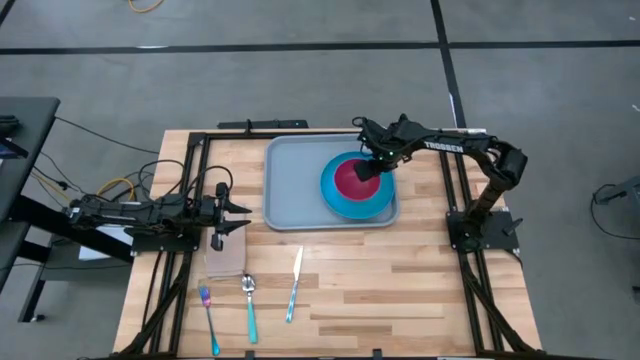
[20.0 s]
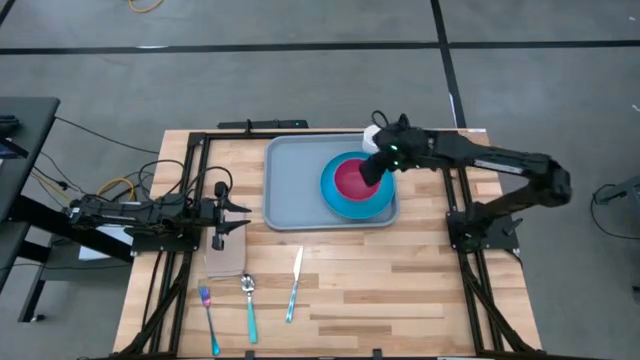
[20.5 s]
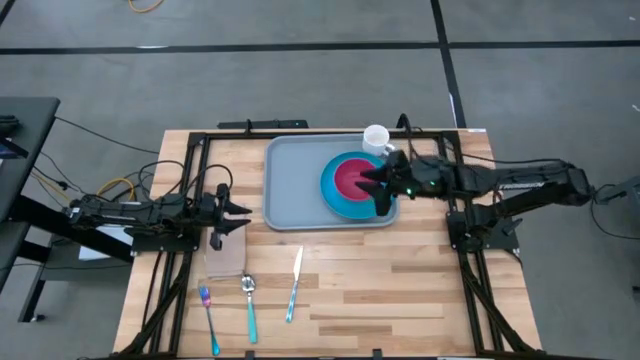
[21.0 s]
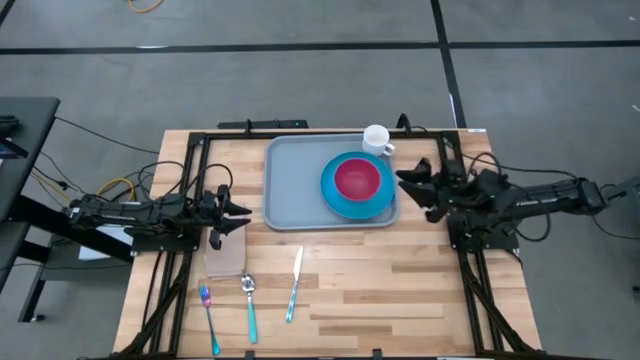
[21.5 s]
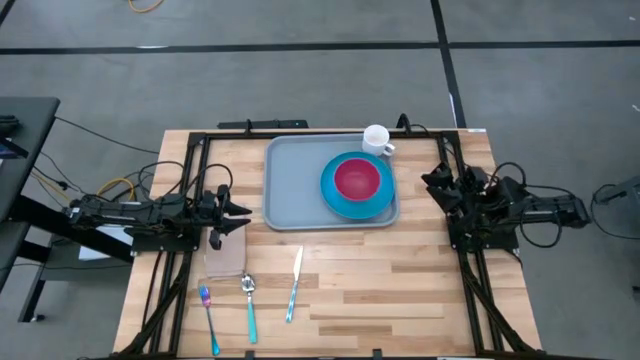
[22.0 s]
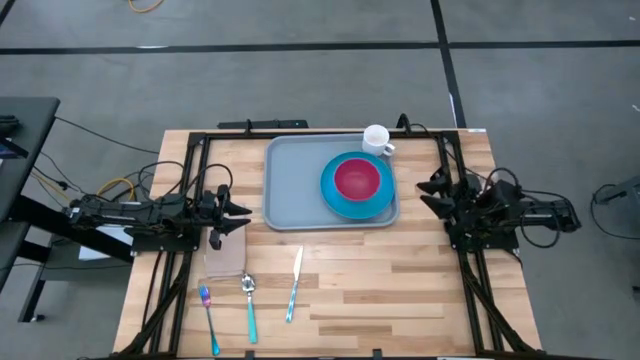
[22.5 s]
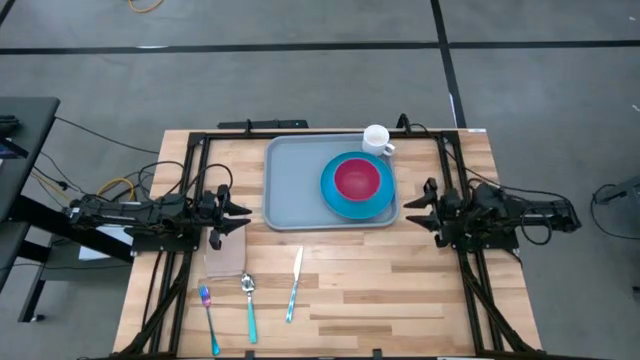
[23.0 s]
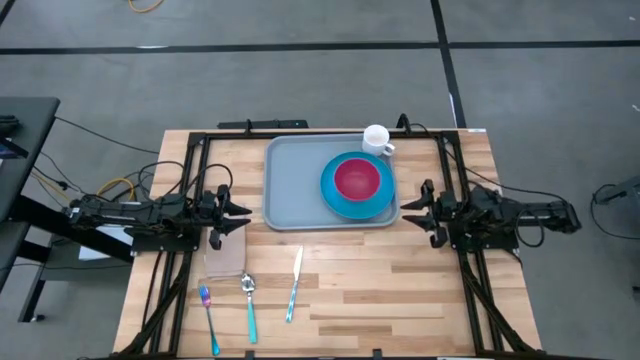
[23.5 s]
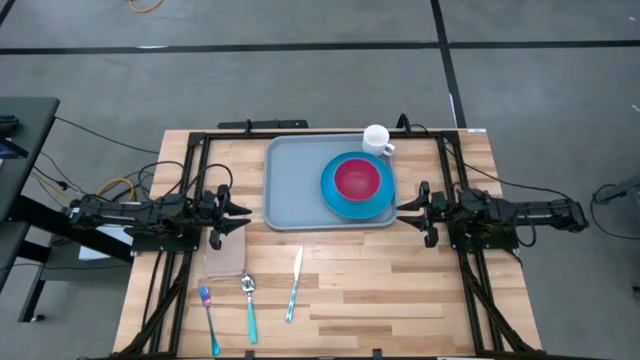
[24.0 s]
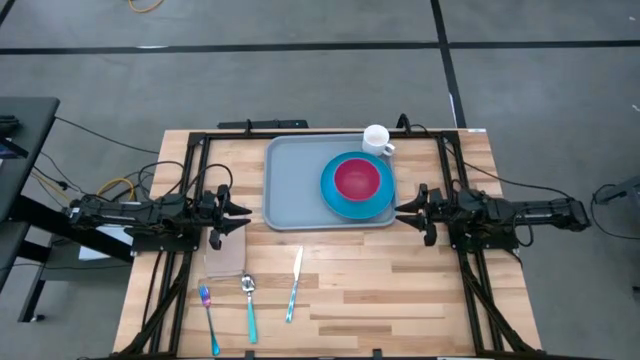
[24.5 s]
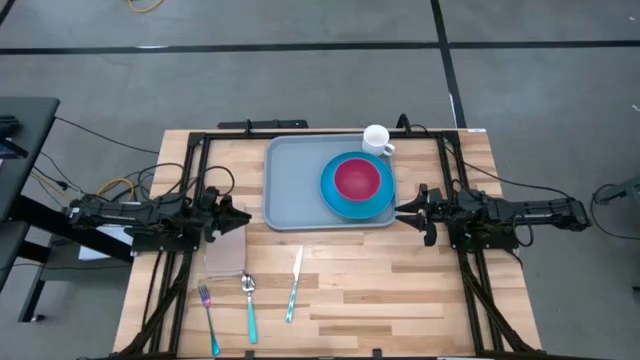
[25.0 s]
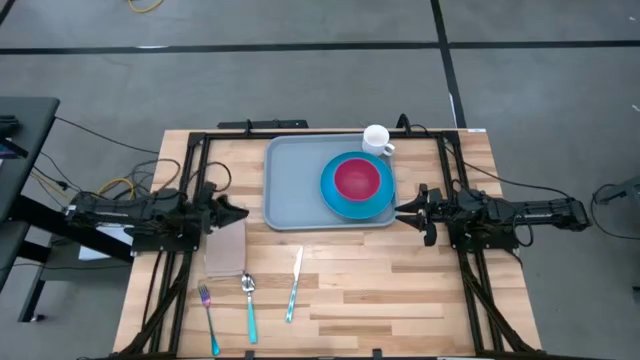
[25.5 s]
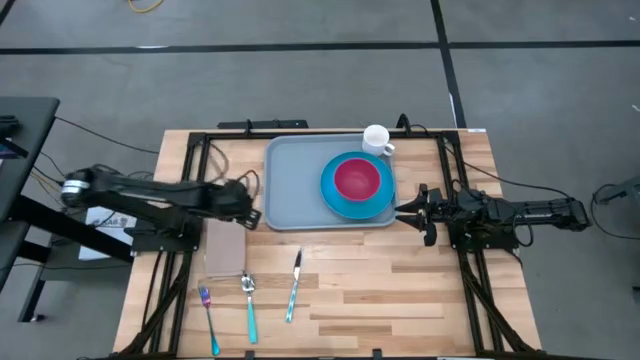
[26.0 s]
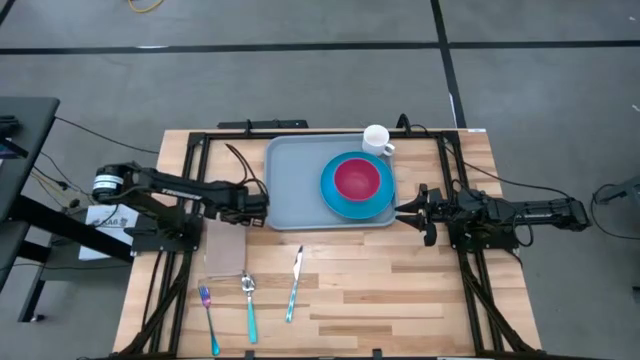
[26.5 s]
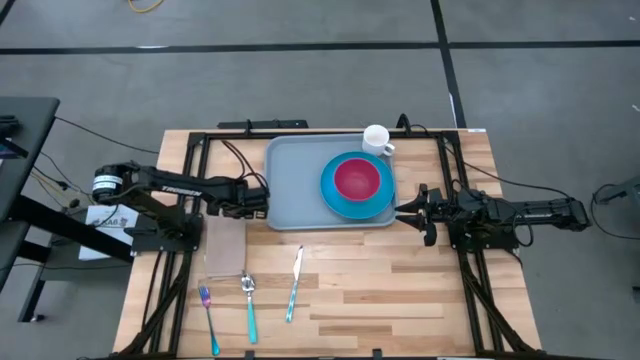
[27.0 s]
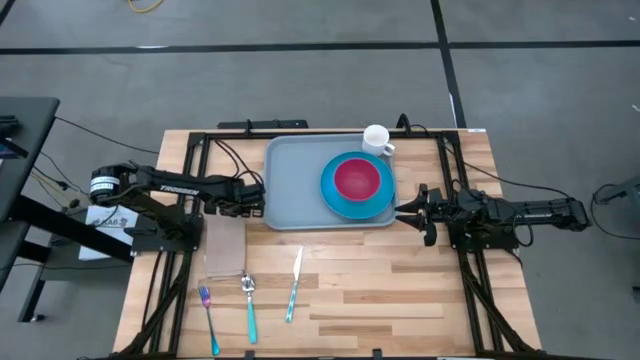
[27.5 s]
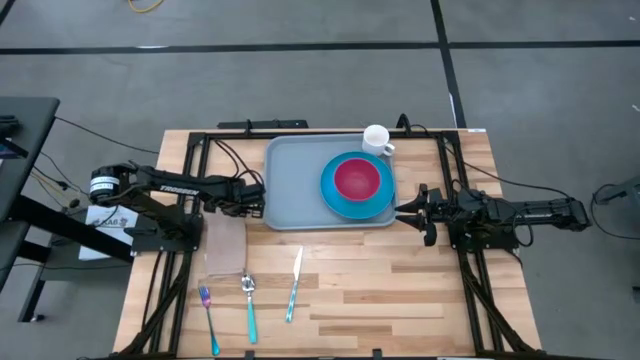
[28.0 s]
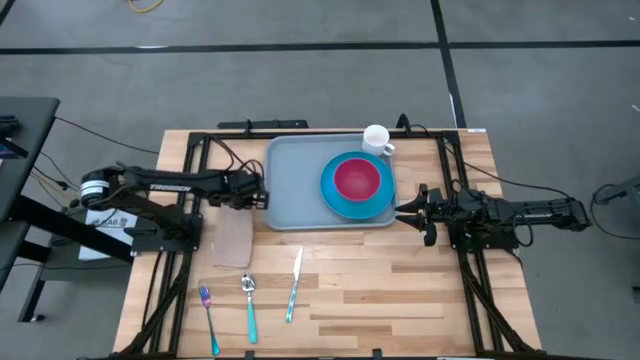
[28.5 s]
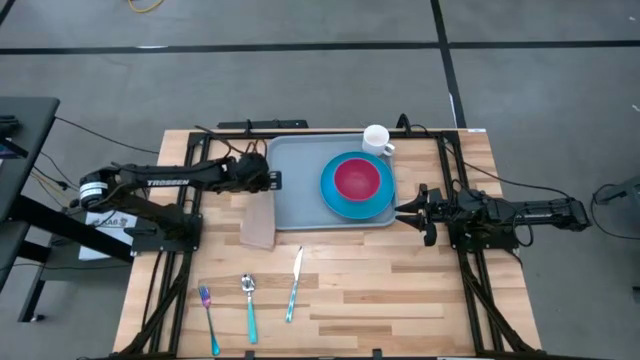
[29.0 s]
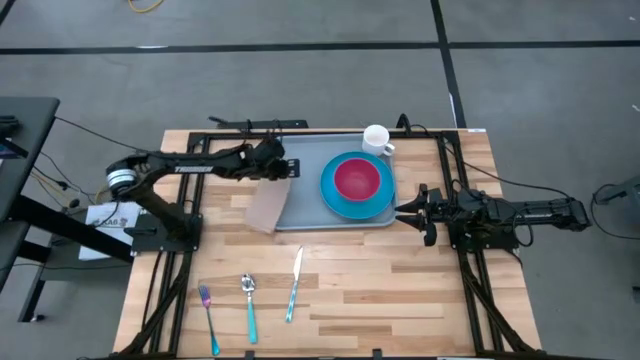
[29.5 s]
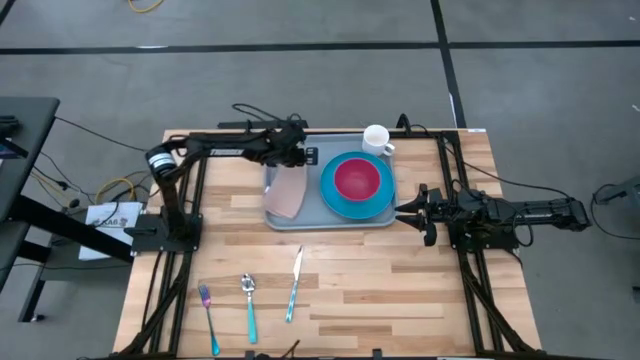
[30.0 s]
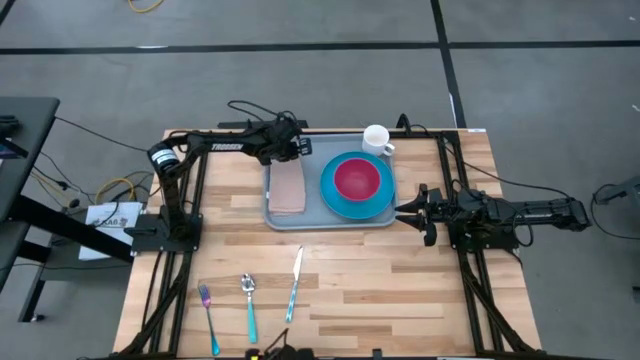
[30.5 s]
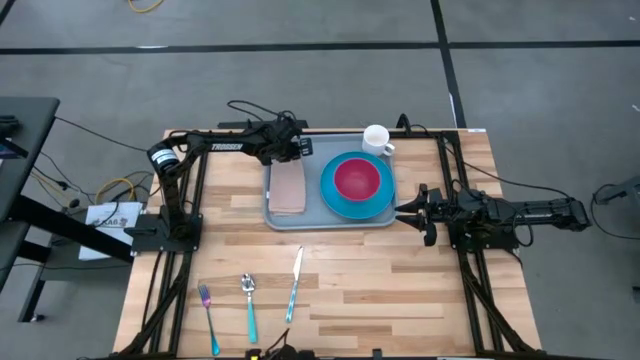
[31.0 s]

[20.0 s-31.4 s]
Task: Set up tray
Put the light brown napkin on the gray tray

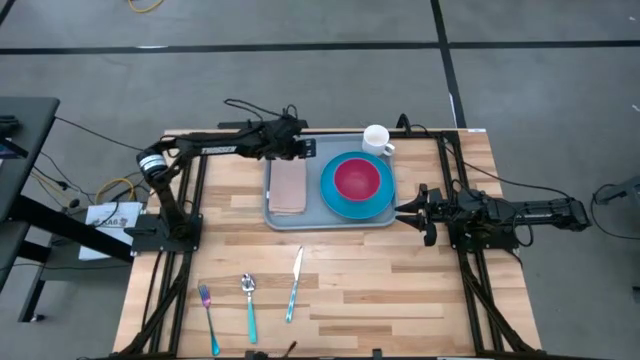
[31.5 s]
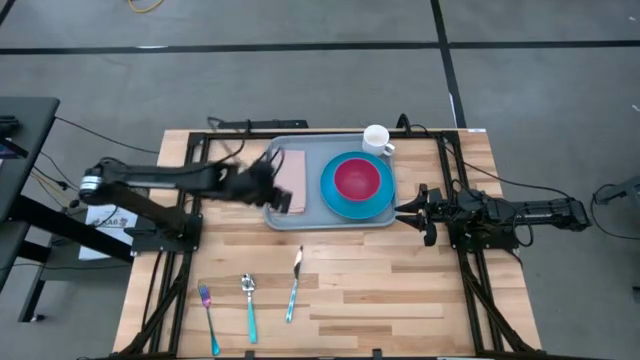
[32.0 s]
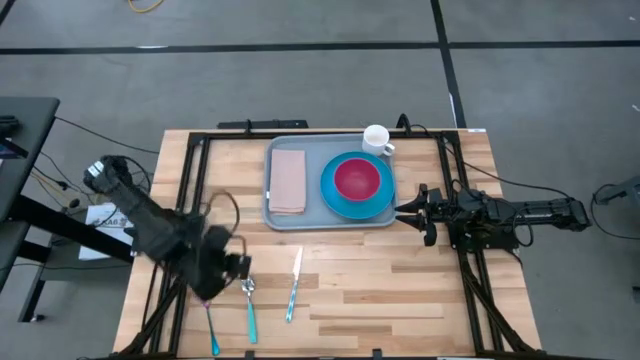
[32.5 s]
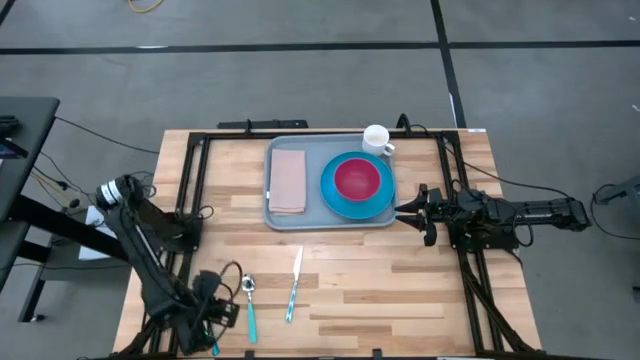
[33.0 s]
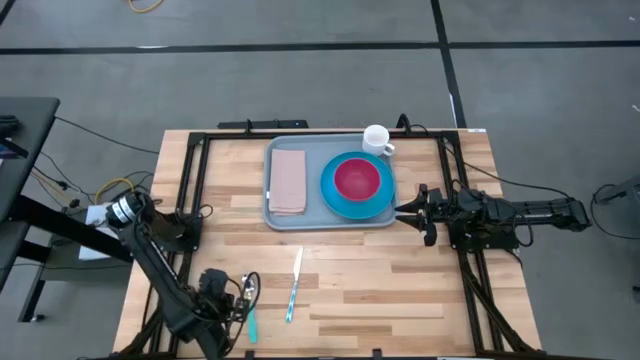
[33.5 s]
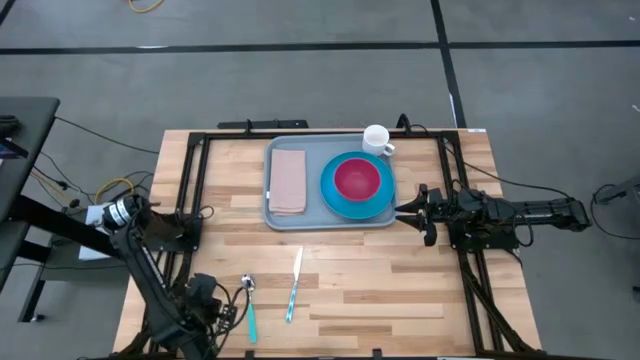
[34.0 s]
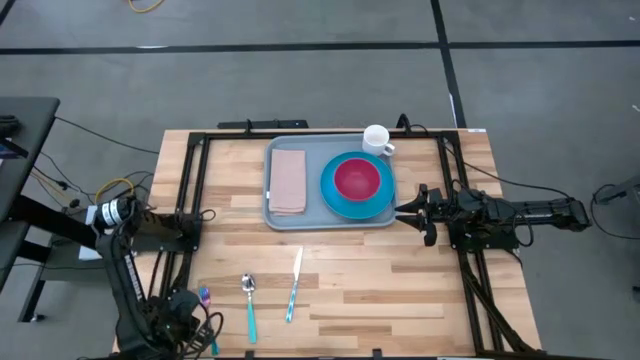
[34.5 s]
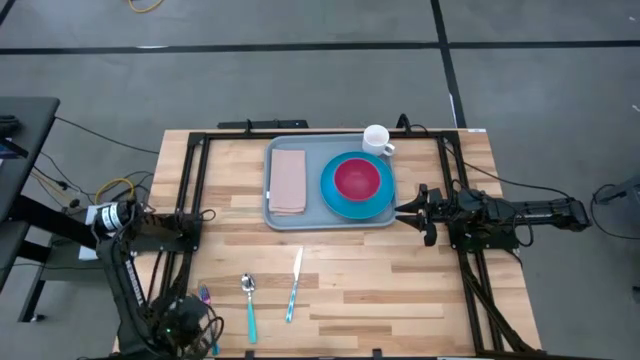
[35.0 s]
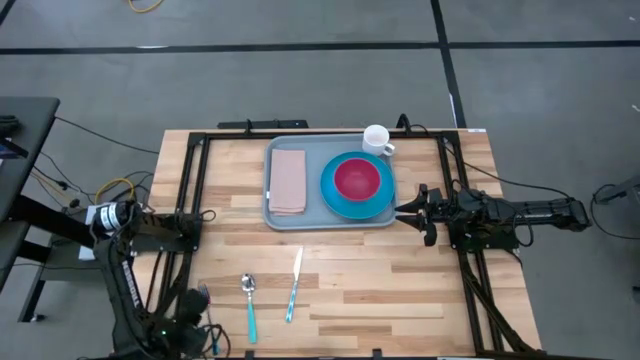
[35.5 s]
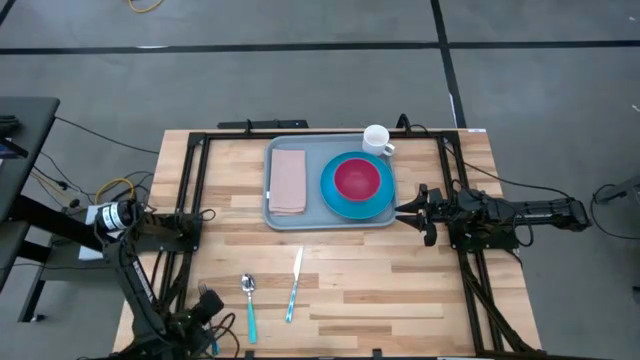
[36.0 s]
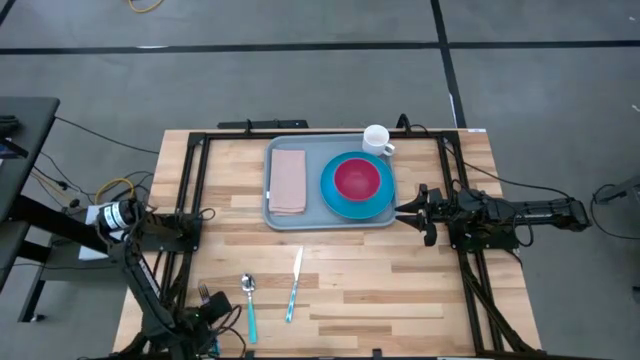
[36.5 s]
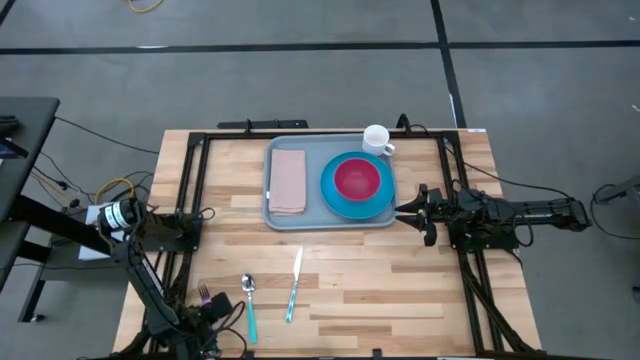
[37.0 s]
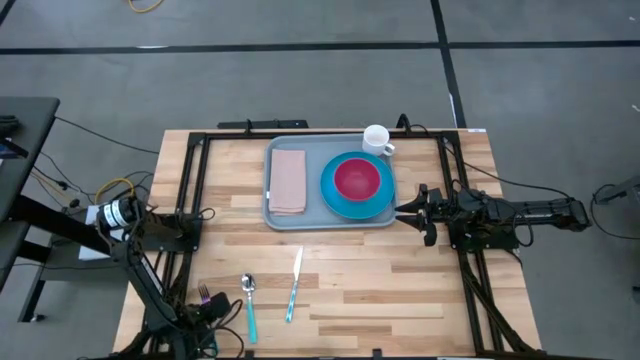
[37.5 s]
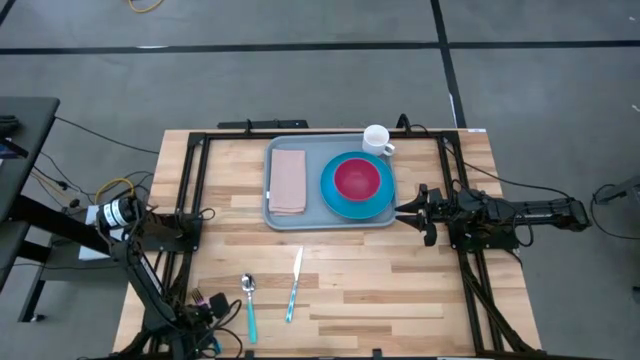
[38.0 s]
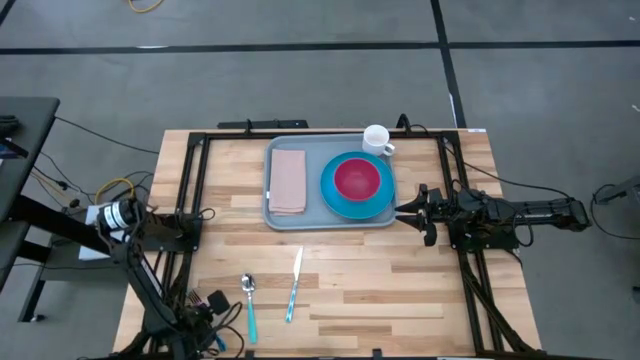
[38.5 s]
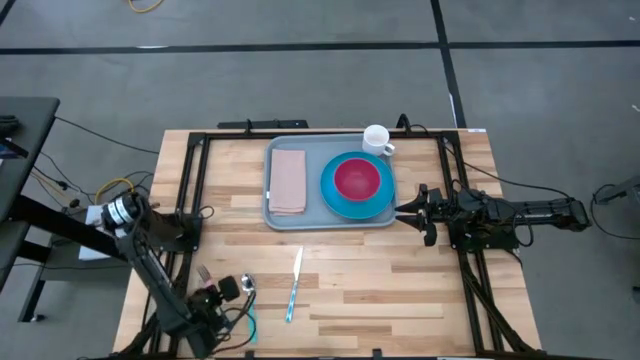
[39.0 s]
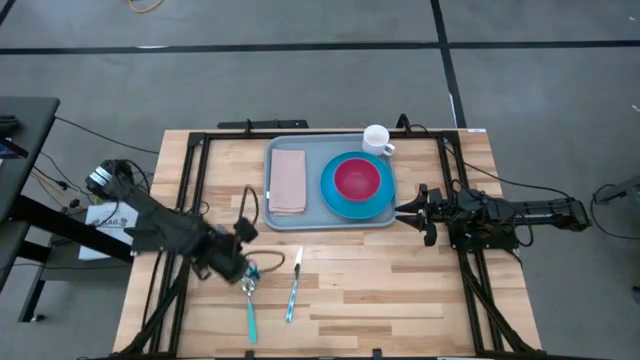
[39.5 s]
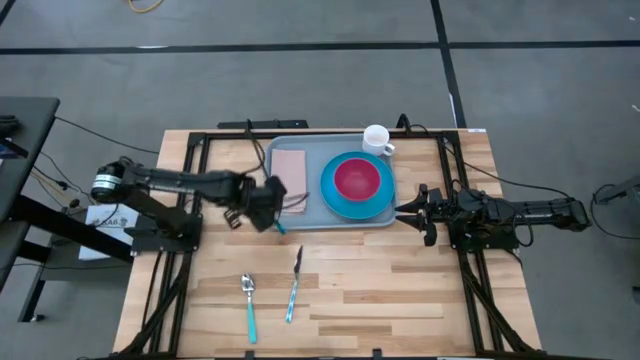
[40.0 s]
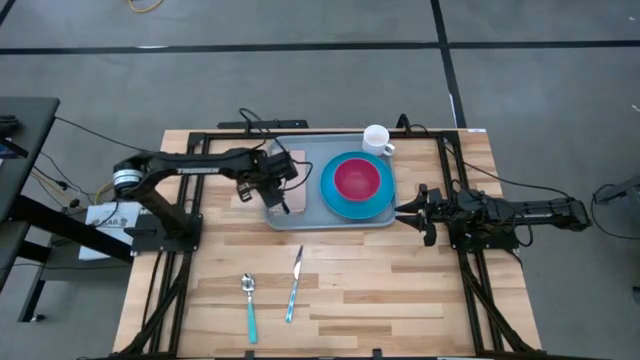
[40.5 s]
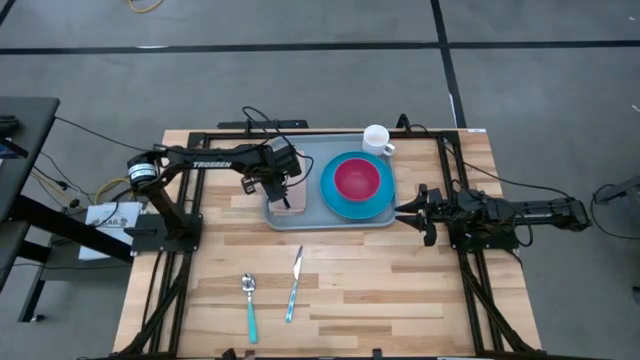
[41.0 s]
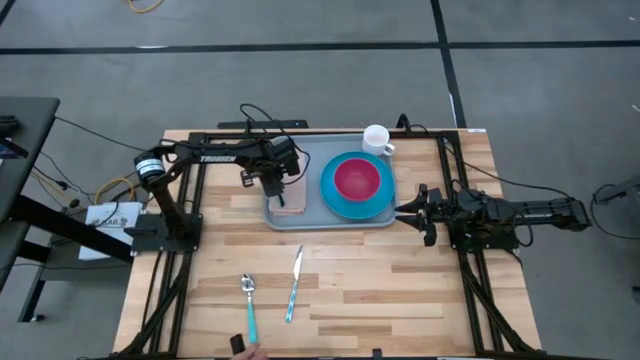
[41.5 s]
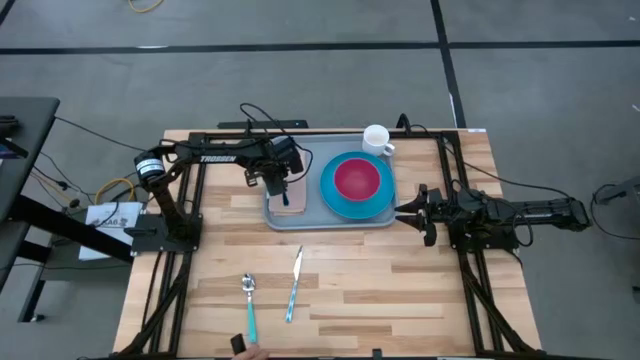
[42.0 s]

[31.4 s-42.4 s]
Put the iridescent fork on the light brown napkin
